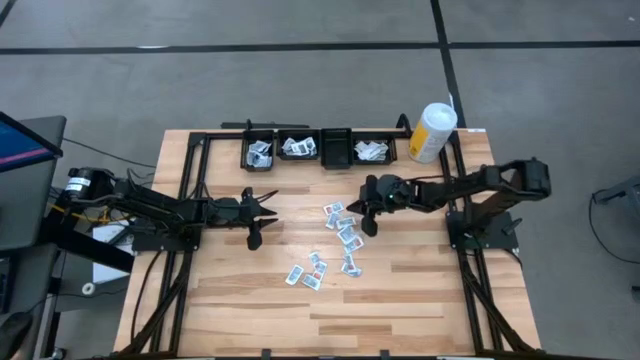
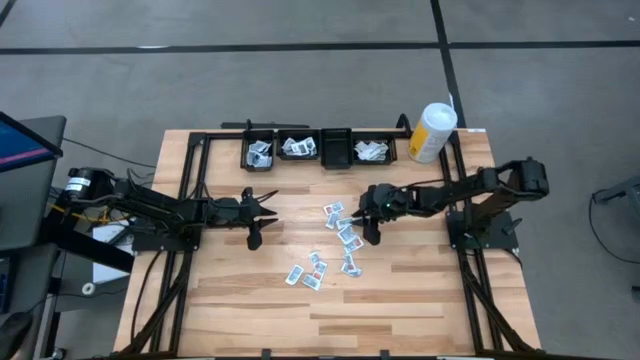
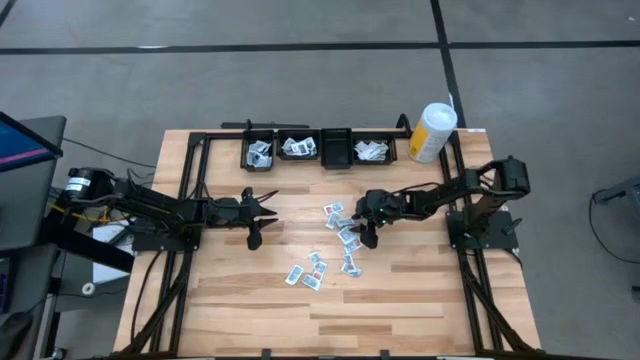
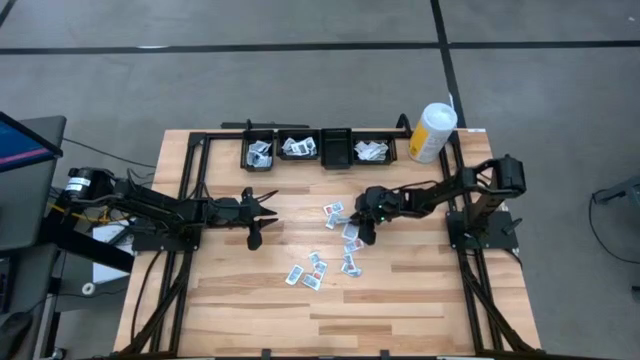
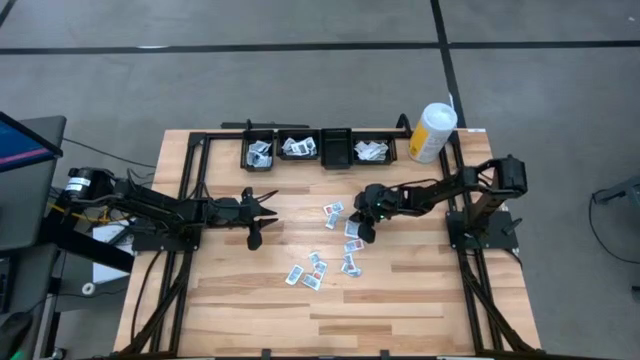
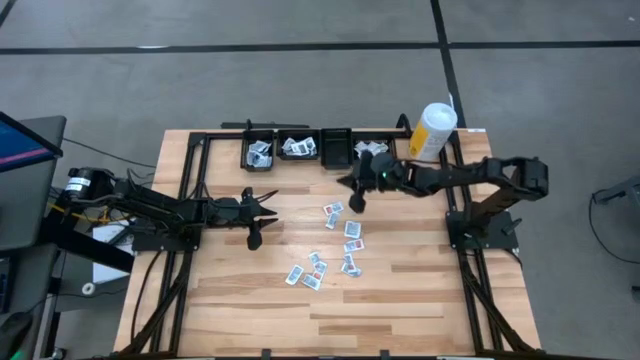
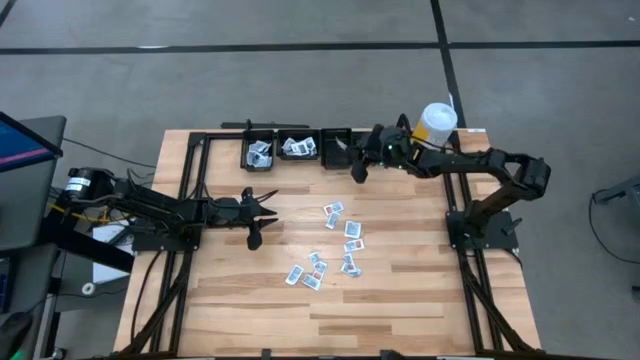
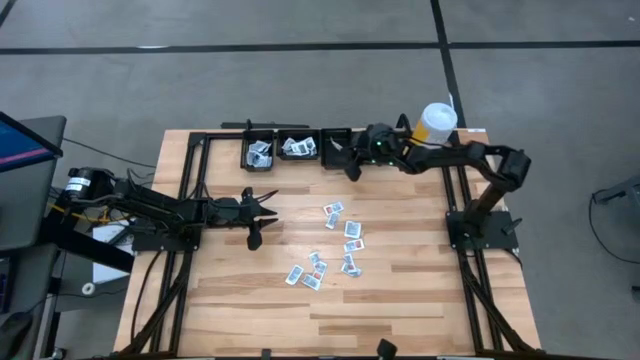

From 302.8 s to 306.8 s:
Task: Pick & Place First Aid Supplies
Put the orange ointment pack into the middle right black bin

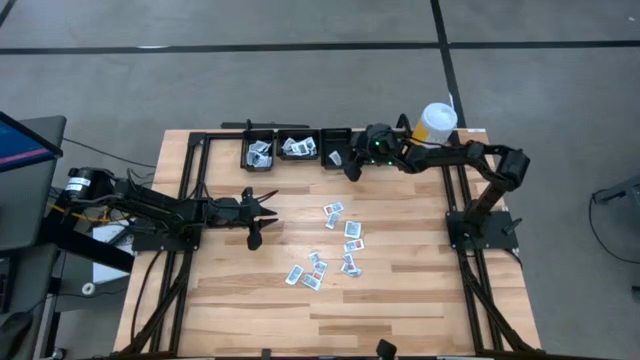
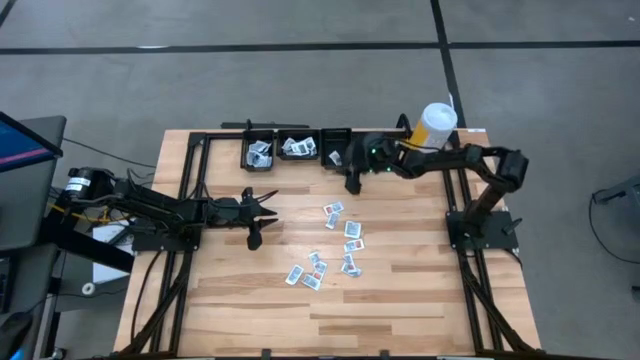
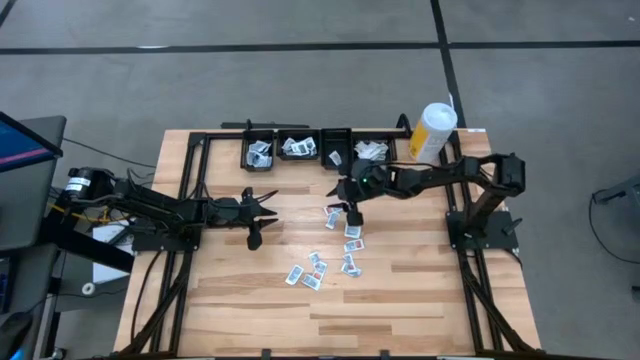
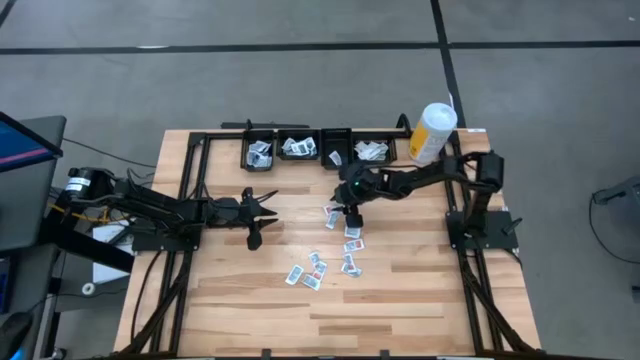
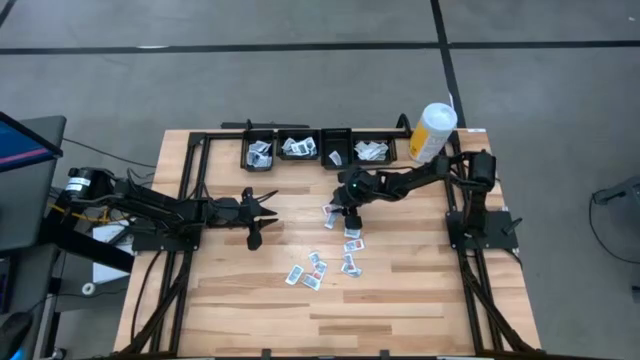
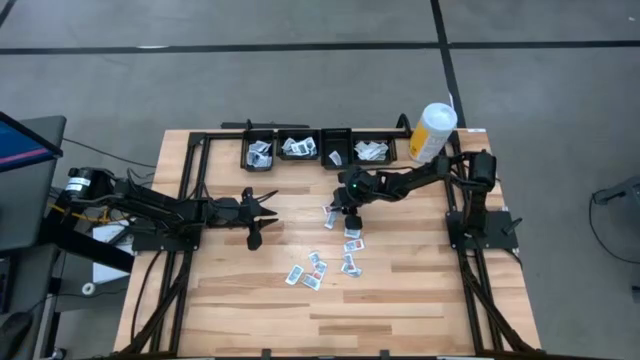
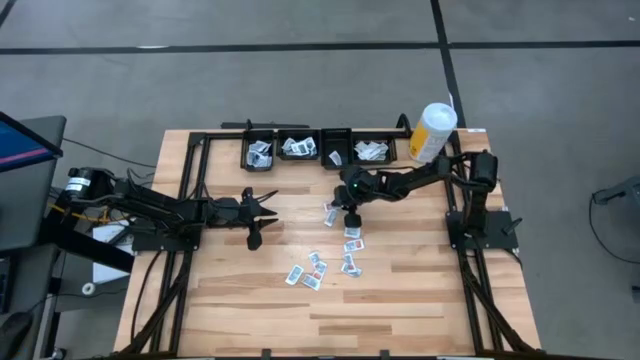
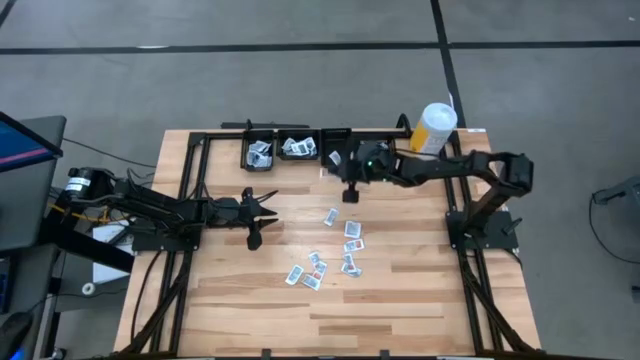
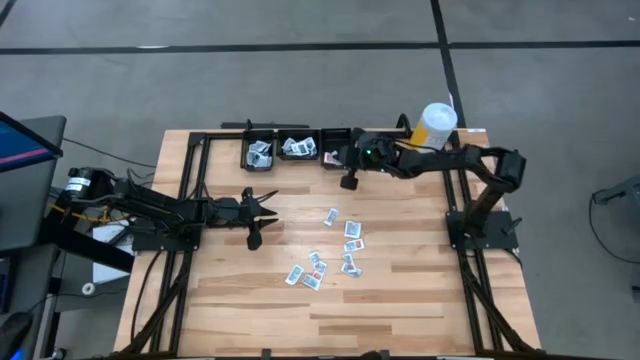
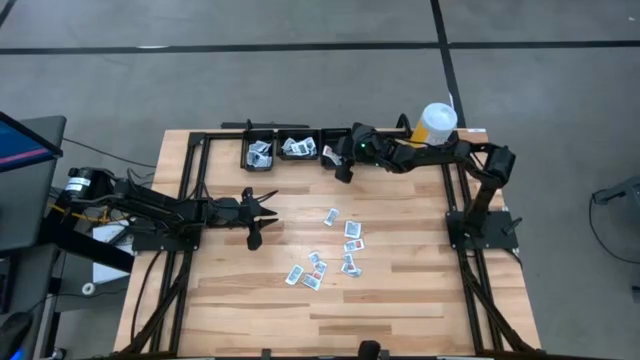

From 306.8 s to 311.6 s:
Put the orange ointment pack into the middle right black bin

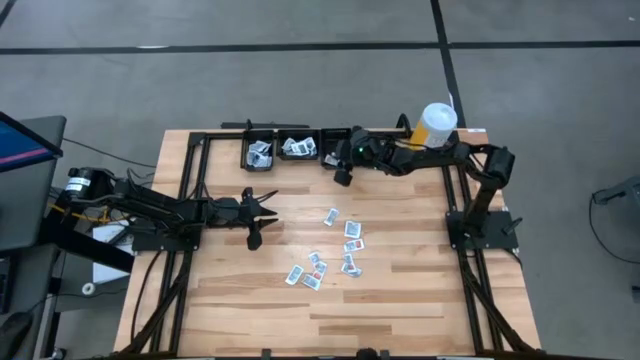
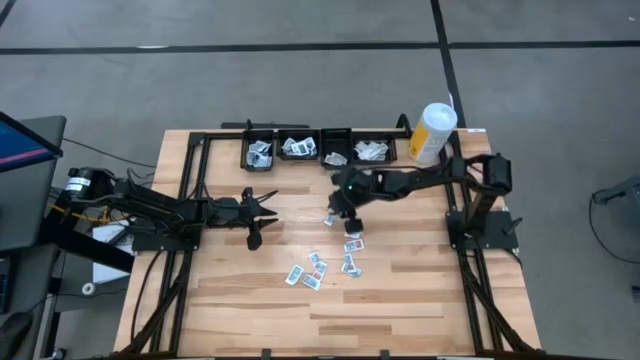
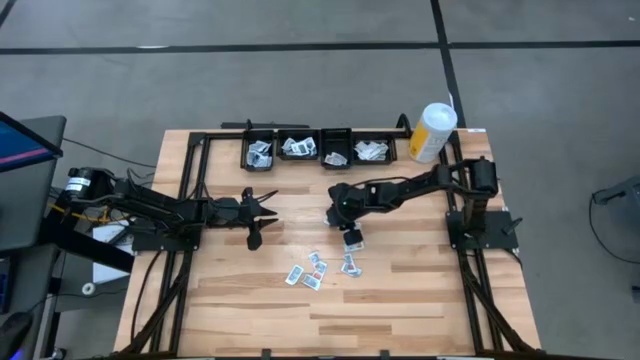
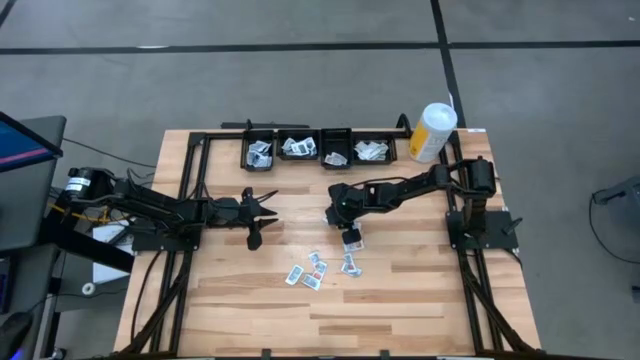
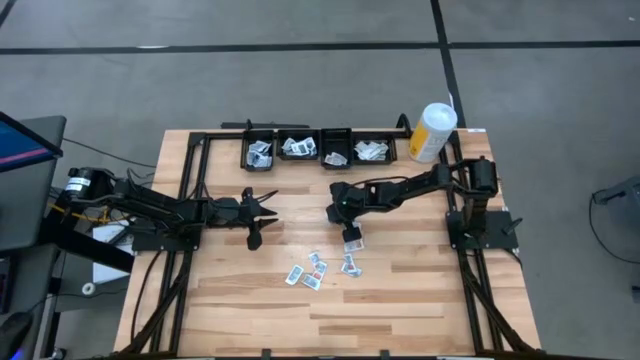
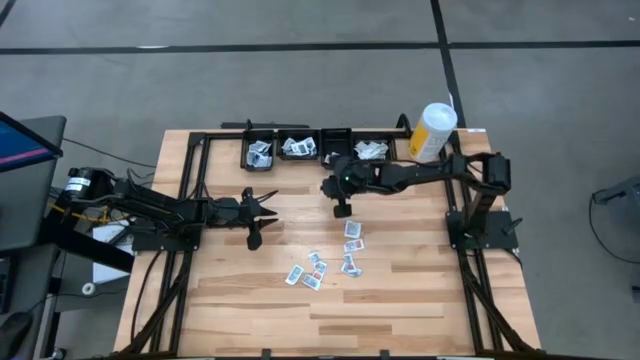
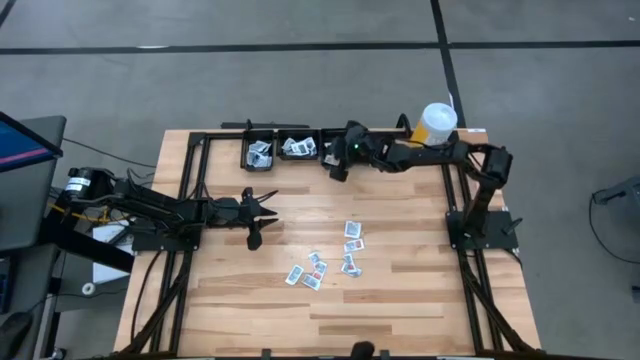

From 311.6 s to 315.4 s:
Put the orange ointment pack into the middle right black bin

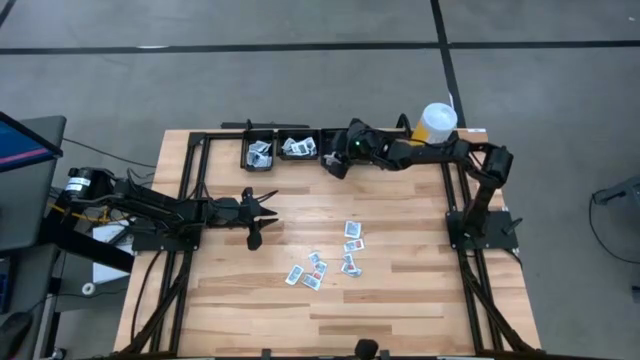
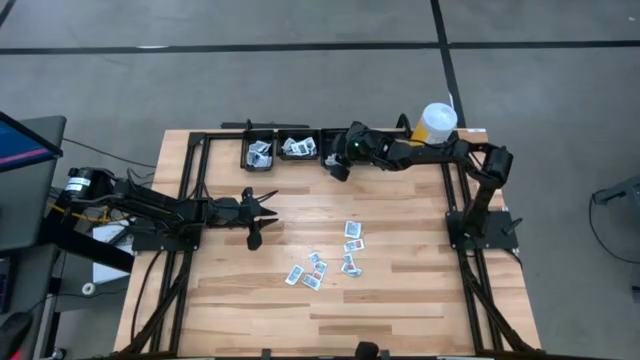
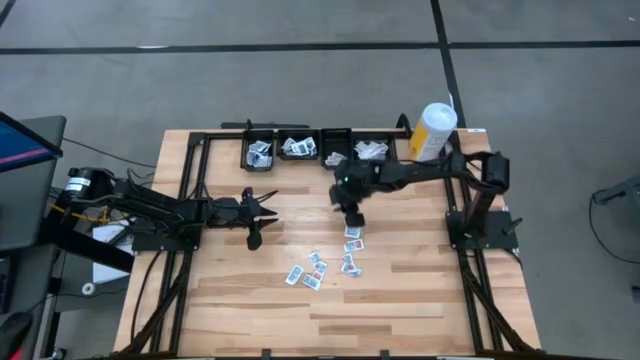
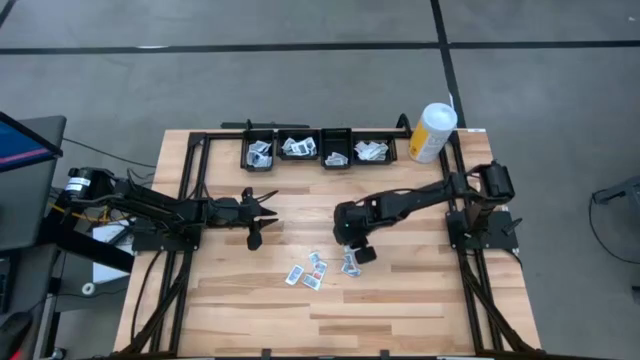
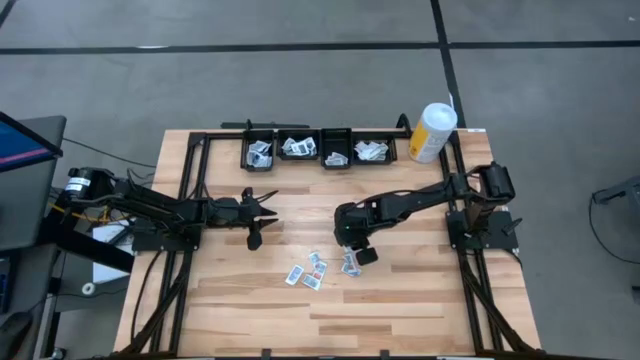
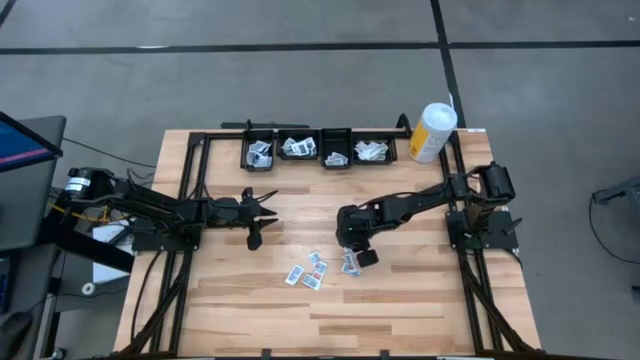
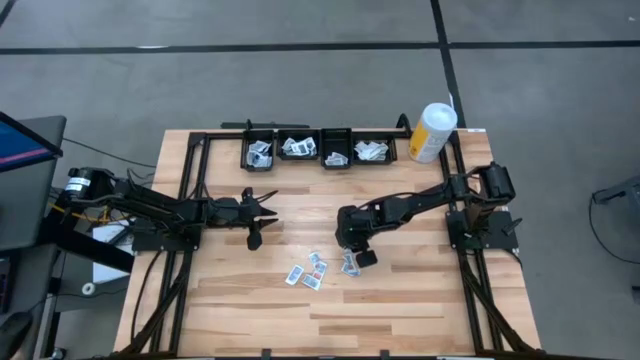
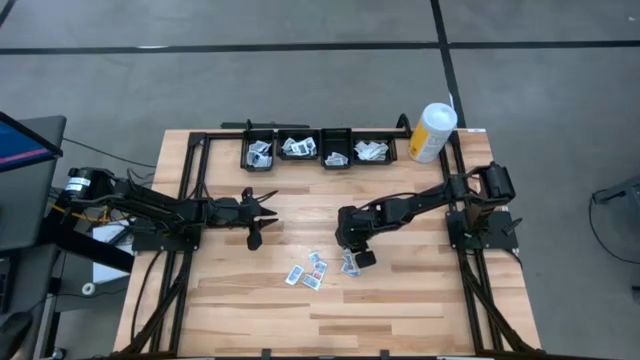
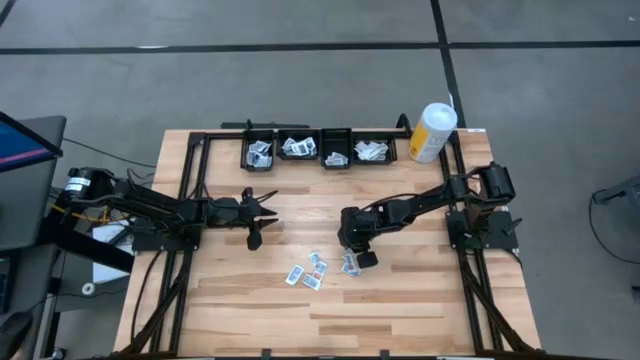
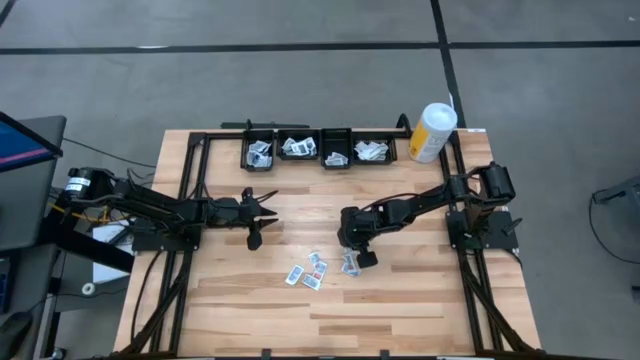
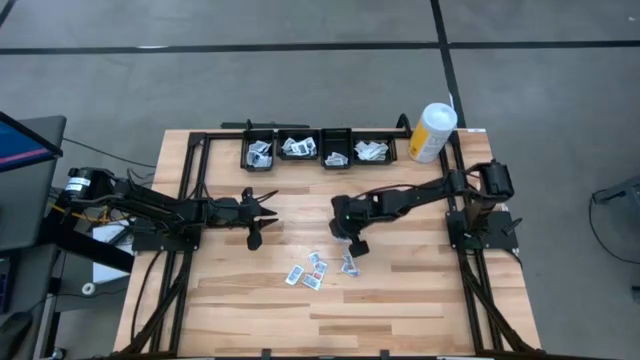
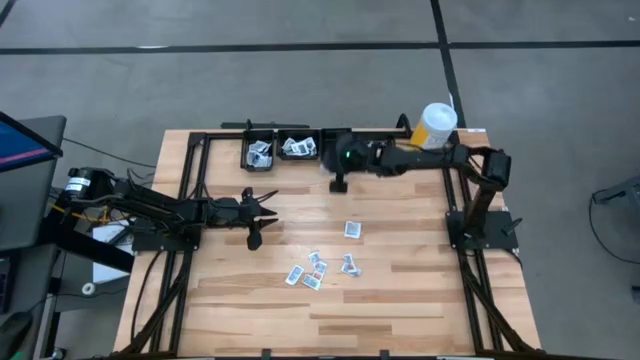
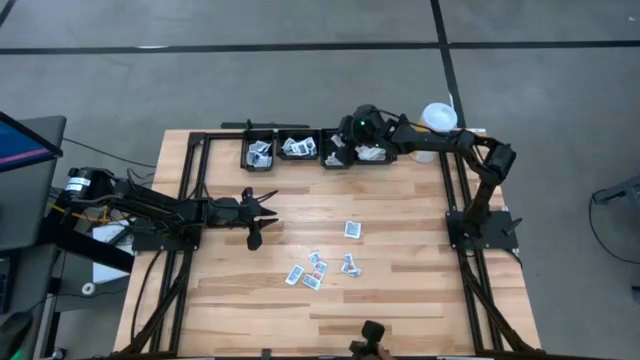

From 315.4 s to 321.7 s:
Put the orange ointment pack into the middle right black bin

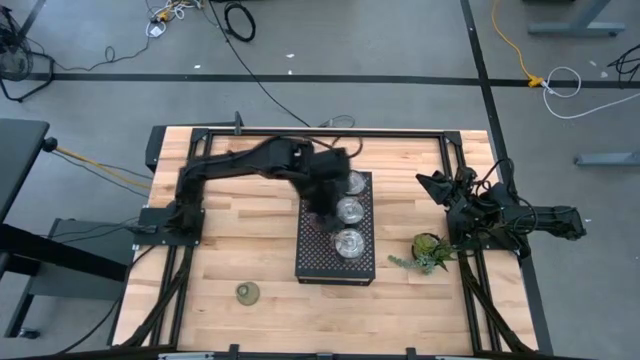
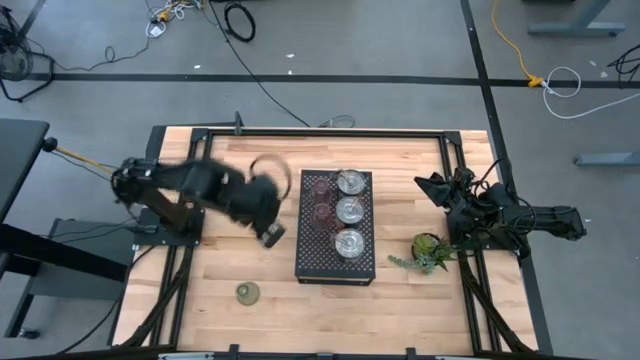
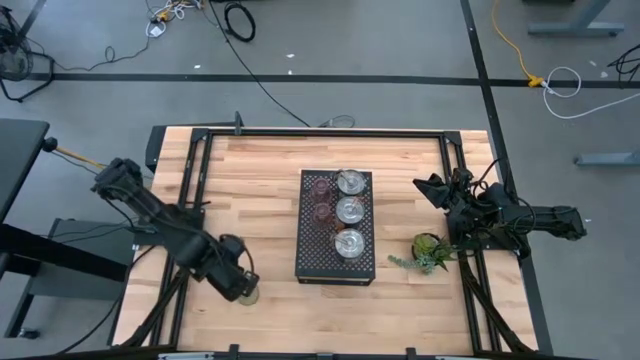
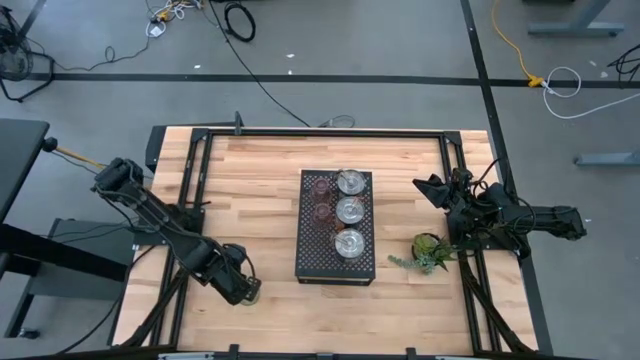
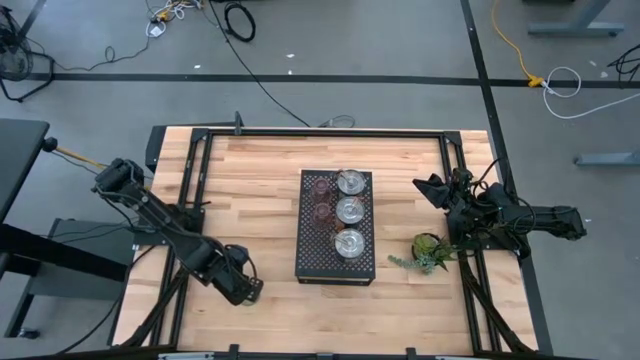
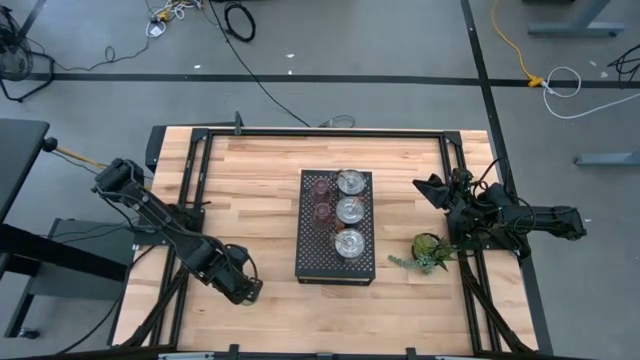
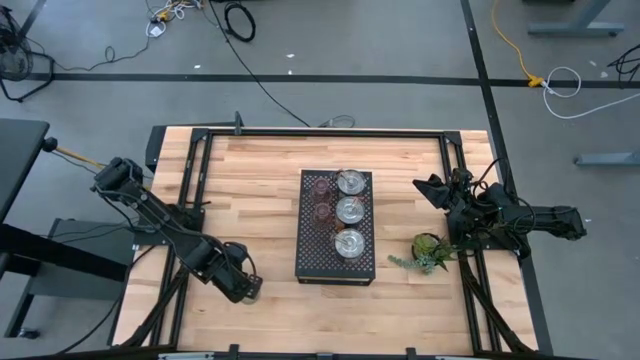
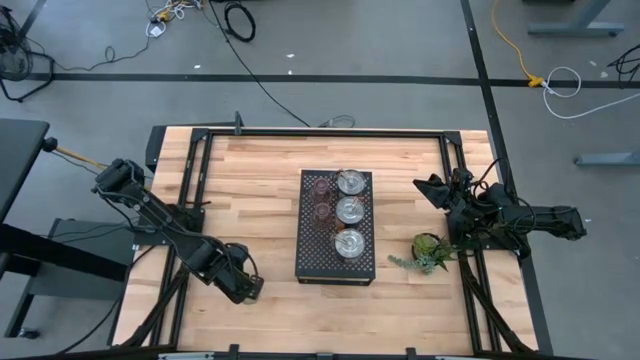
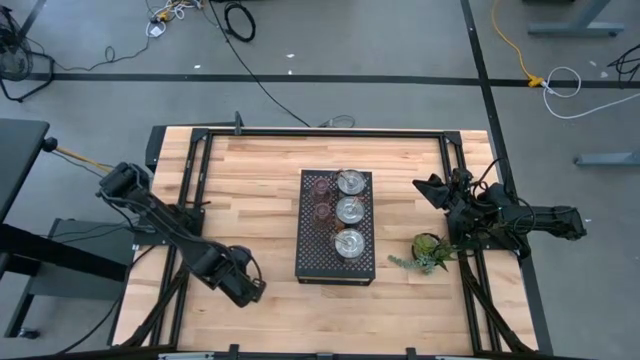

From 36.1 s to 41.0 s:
Task: Pick & Place candle stick holders
Put the green glass holder on the shelf
